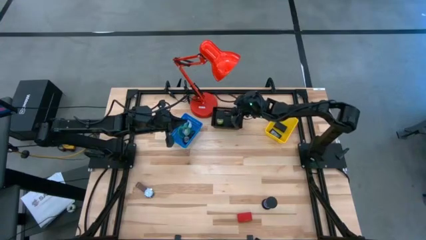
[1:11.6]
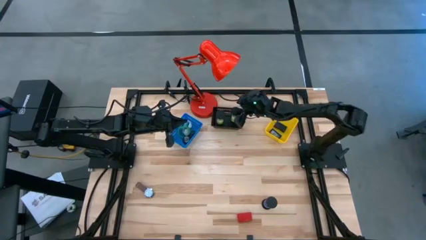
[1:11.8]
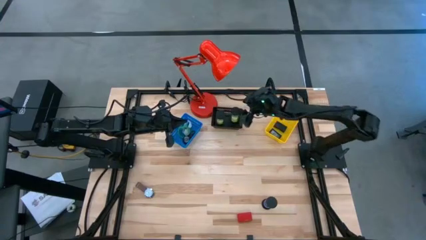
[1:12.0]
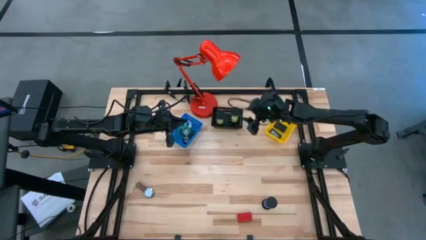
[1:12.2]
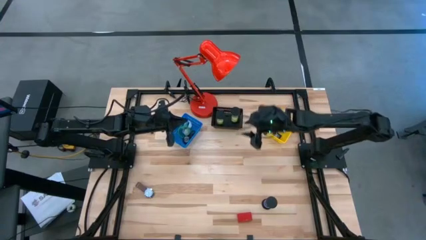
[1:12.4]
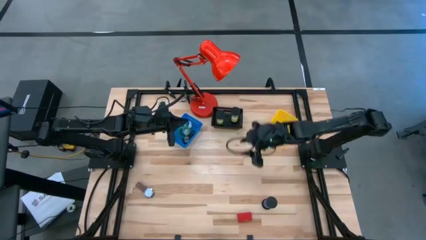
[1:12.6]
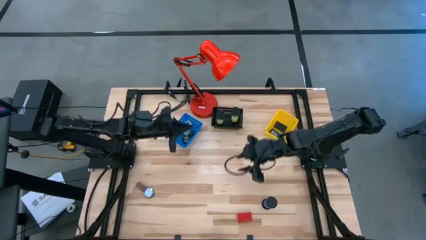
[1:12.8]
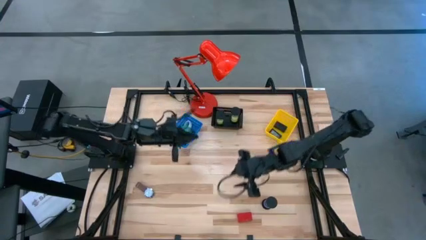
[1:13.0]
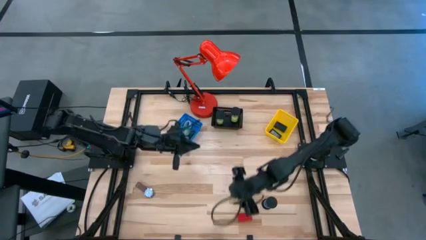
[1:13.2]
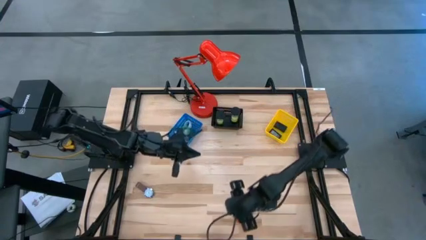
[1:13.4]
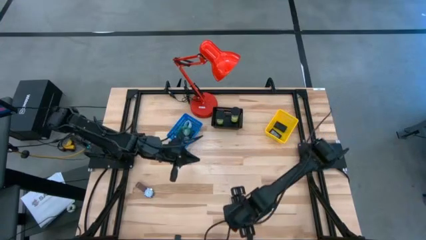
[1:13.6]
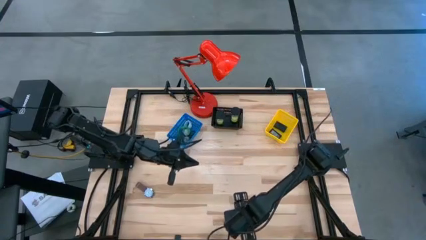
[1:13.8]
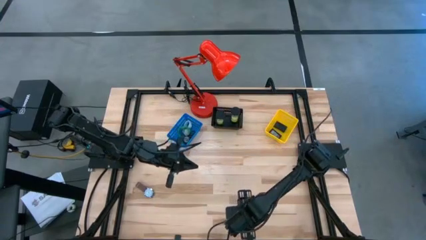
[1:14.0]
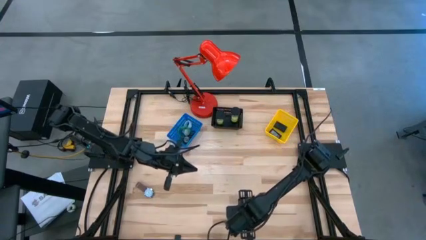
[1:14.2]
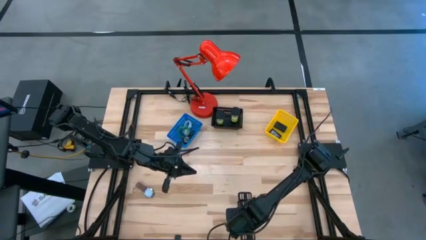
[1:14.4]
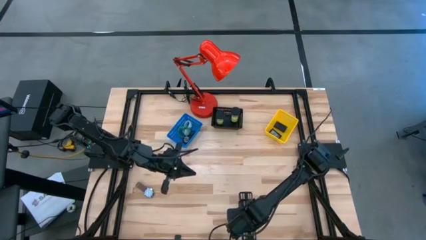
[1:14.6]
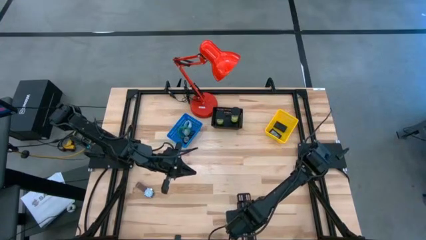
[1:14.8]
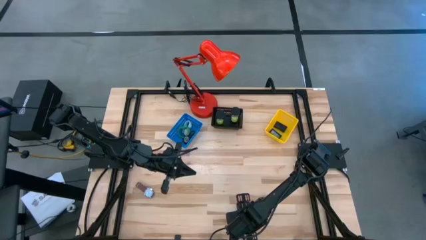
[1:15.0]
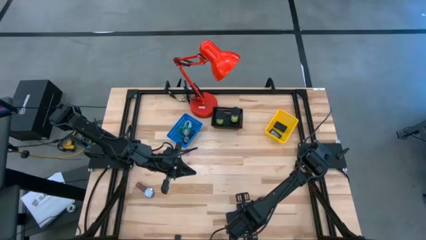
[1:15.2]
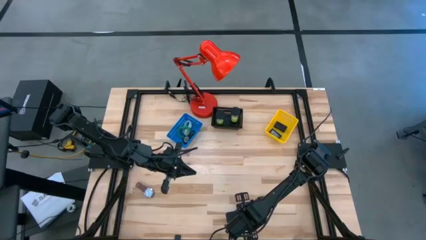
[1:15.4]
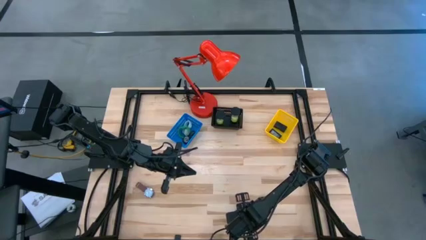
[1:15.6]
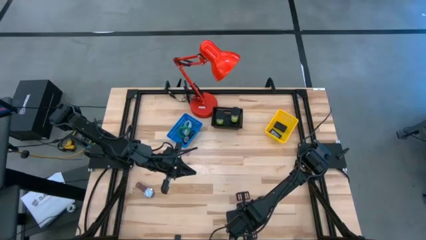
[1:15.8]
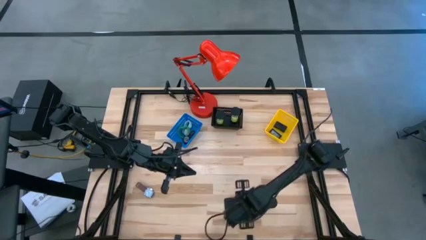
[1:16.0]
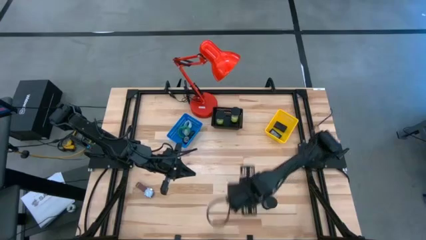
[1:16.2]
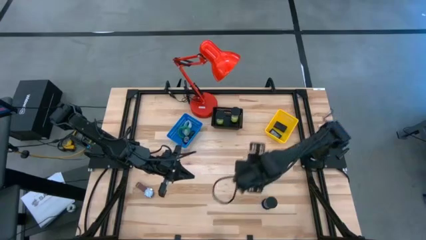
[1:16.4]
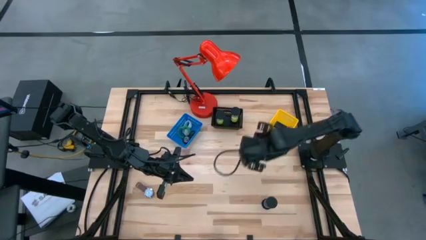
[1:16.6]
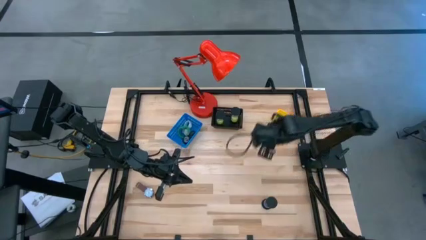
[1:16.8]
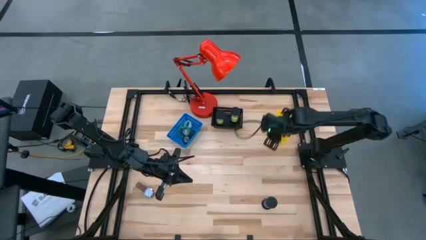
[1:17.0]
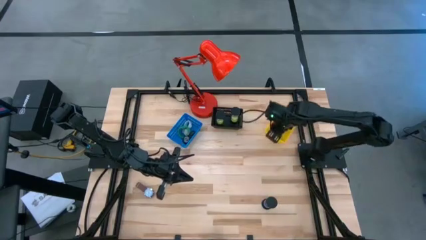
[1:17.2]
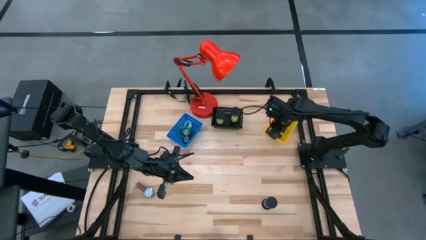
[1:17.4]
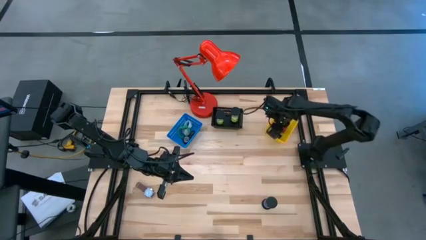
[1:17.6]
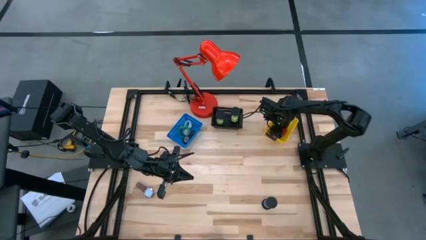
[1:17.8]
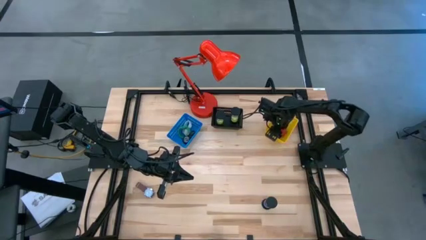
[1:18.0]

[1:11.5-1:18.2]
Task: Pick & Place Office items
Put the red digital timer into the yellow bin

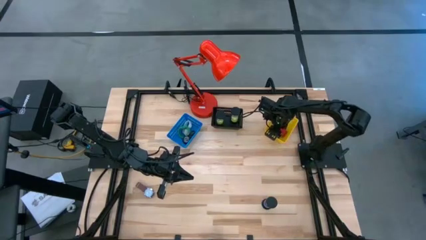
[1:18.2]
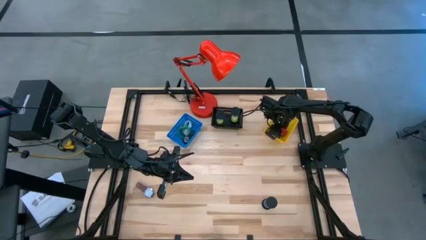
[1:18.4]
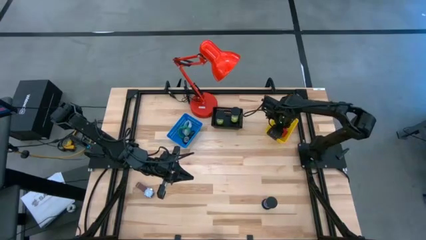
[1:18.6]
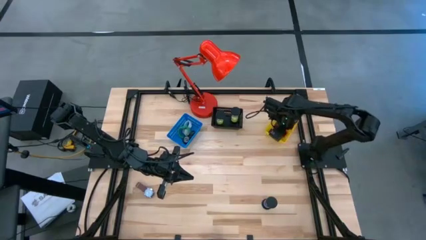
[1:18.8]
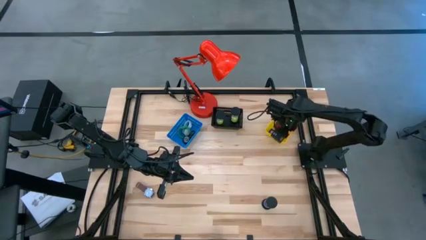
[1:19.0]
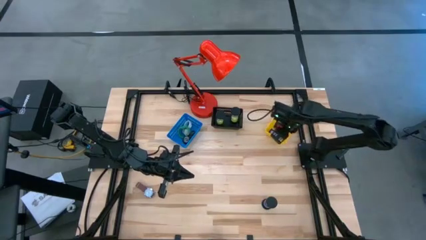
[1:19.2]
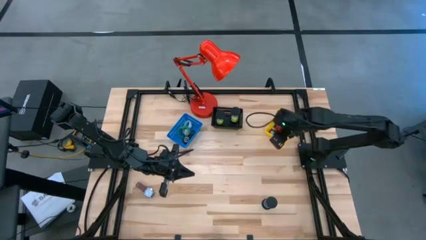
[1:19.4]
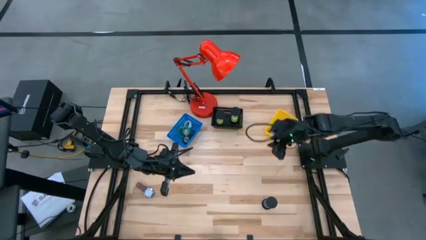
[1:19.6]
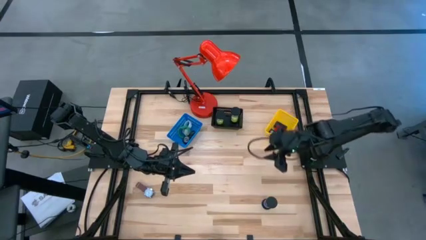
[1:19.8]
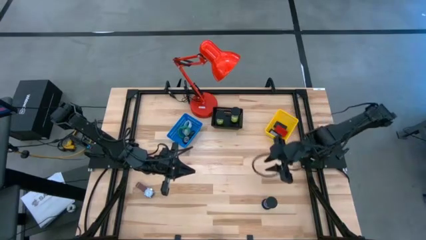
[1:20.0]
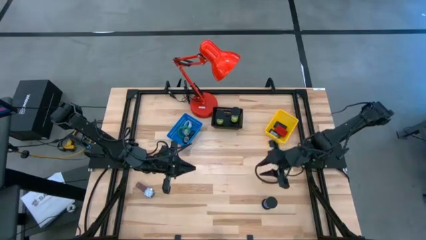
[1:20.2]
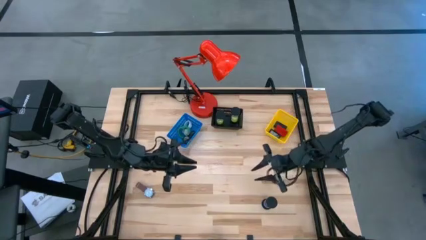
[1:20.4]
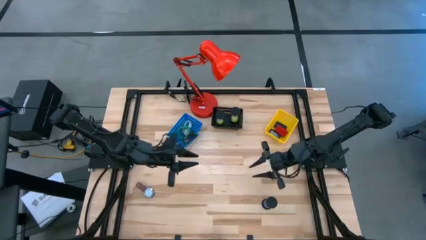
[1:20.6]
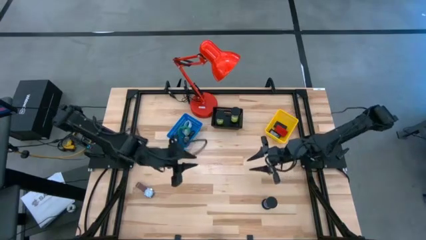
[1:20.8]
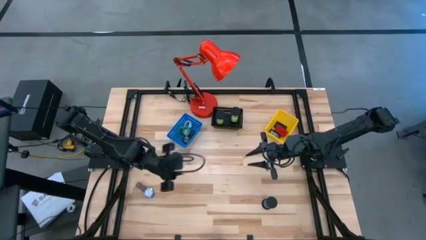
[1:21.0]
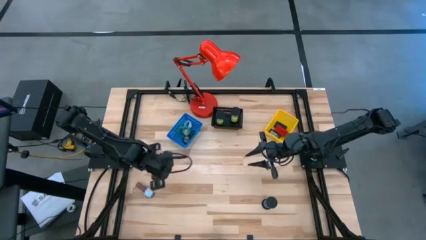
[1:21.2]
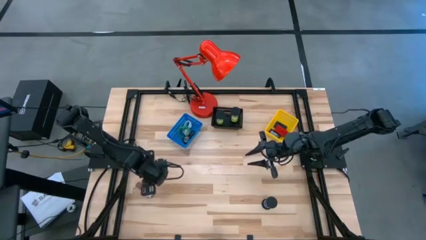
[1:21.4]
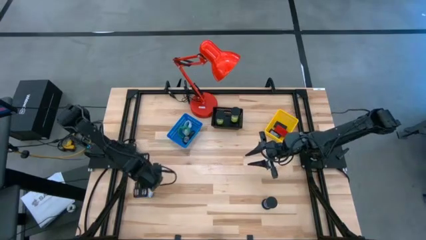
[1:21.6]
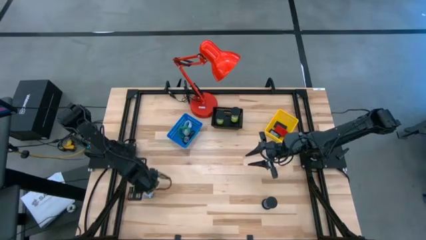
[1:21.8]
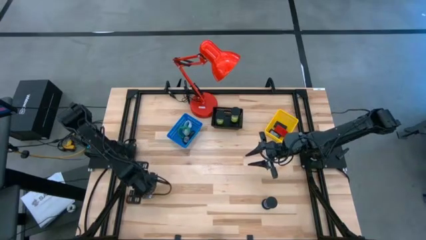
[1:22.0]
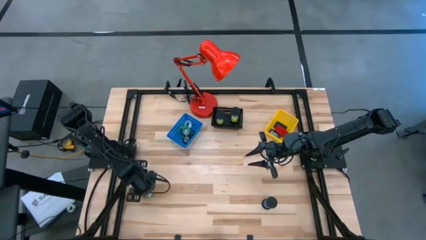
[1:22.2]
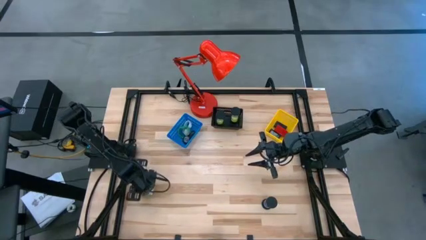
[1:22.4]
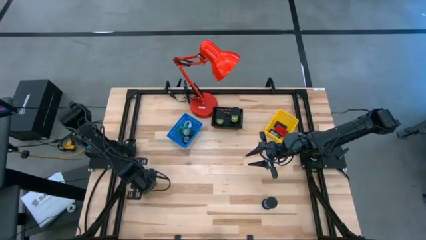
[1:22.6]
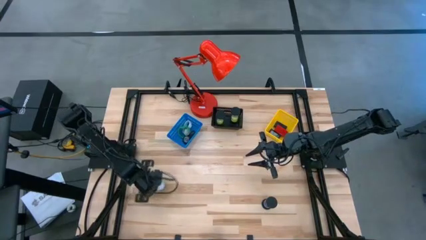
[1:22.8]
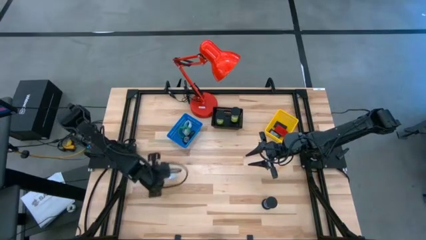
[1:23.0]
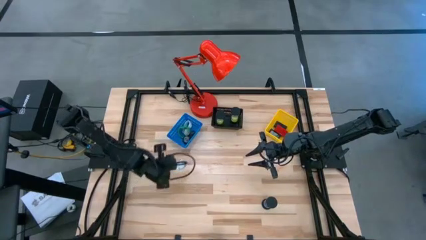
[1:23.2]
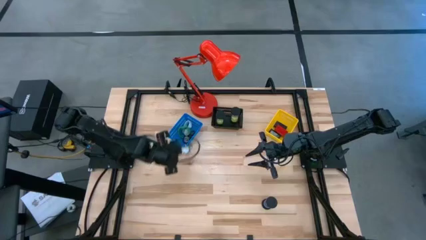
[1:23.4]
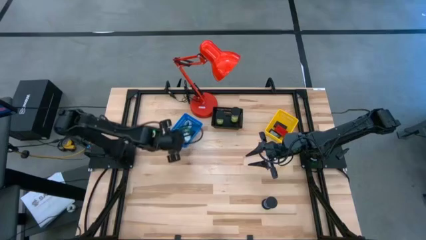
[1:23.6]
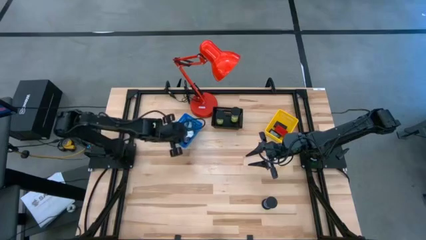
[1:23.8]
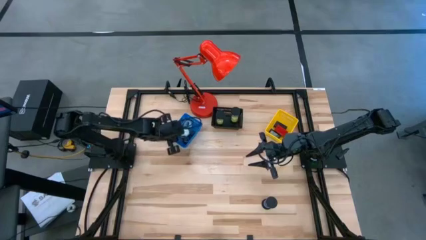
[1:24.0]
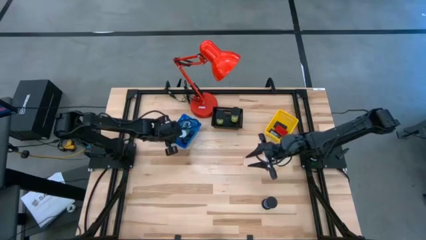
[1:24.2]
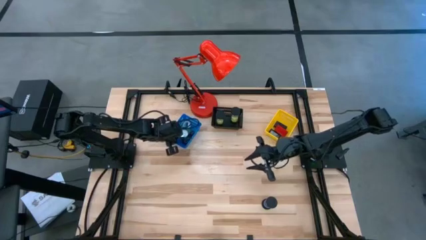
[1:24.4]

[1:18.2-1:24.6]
Put the brown watch into the blue bin
